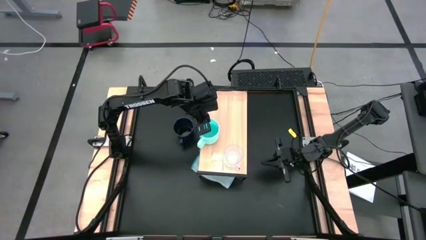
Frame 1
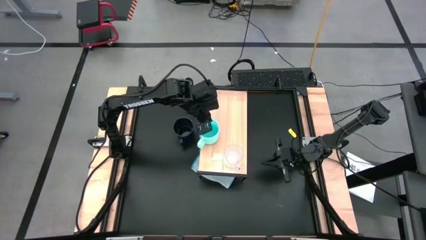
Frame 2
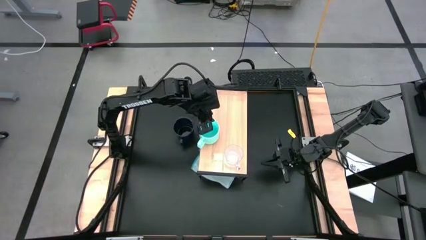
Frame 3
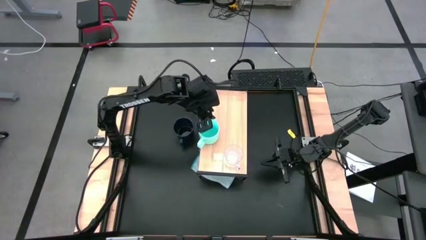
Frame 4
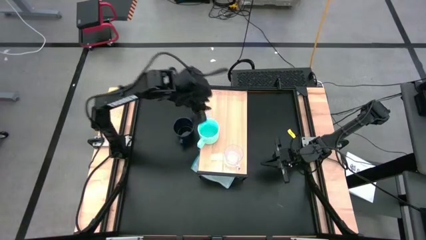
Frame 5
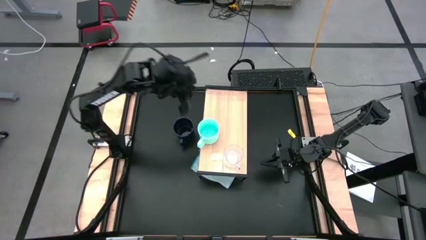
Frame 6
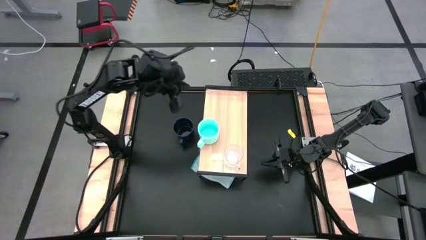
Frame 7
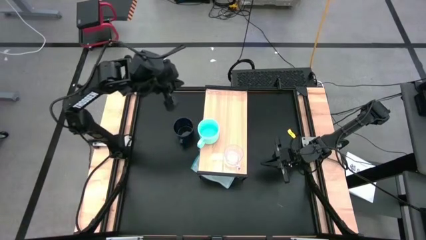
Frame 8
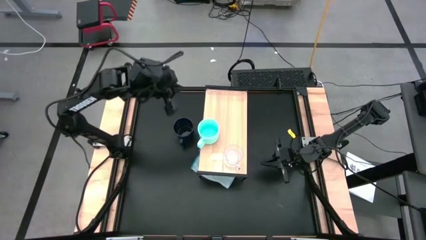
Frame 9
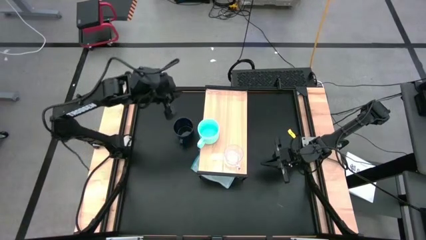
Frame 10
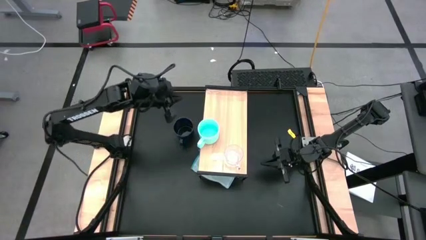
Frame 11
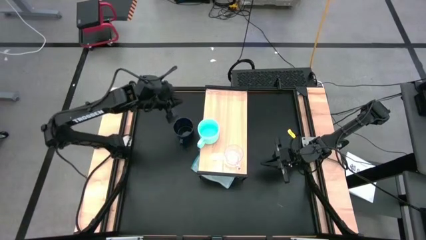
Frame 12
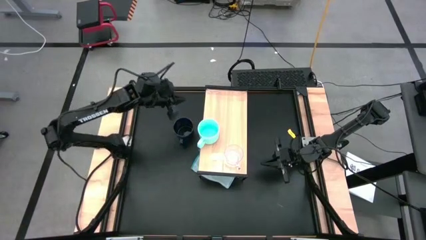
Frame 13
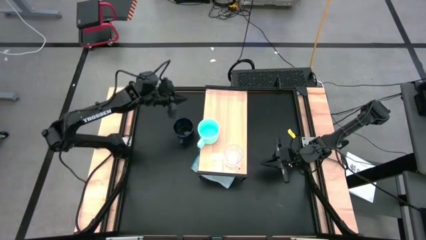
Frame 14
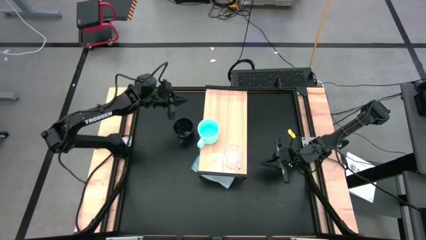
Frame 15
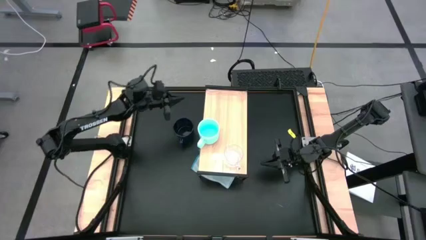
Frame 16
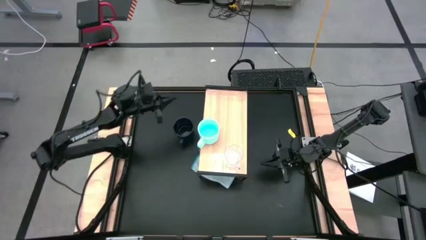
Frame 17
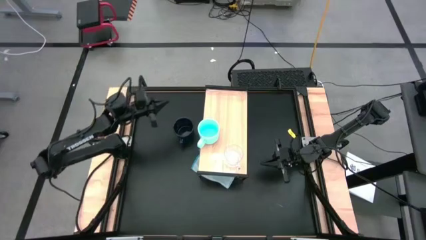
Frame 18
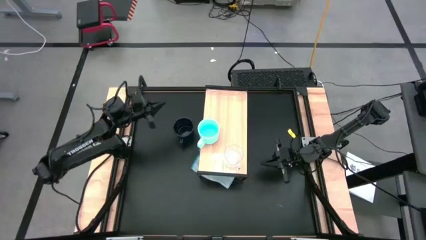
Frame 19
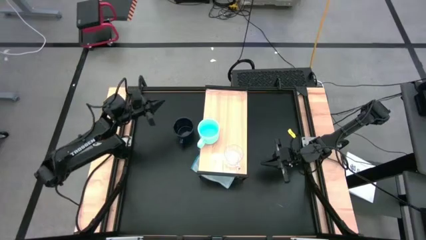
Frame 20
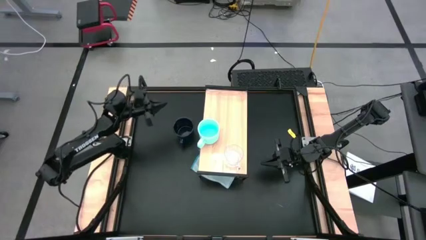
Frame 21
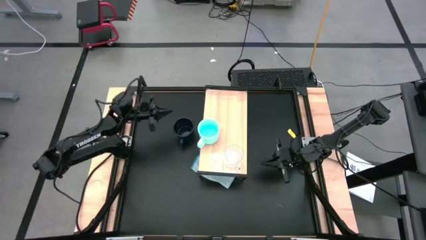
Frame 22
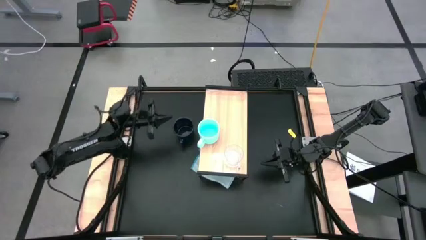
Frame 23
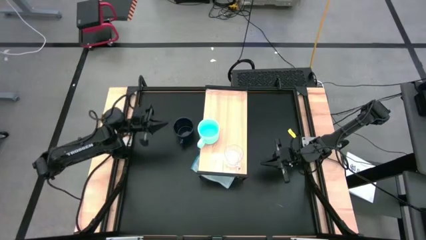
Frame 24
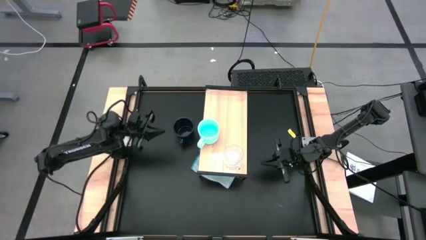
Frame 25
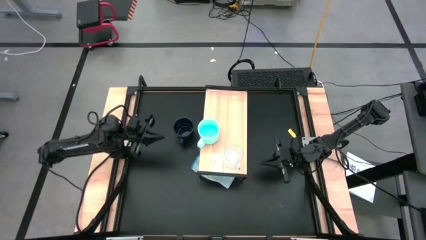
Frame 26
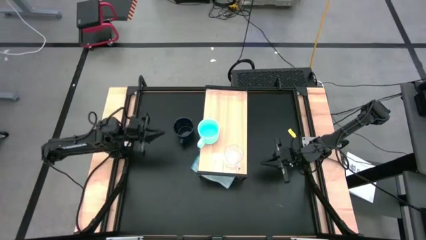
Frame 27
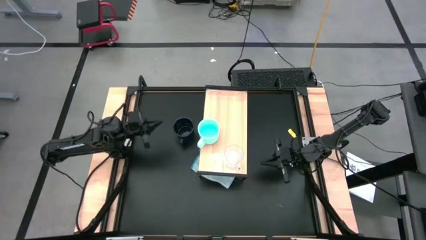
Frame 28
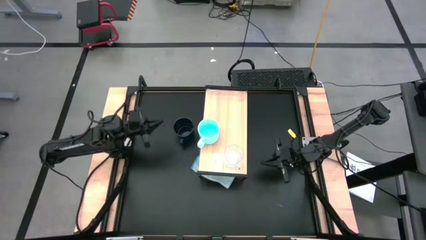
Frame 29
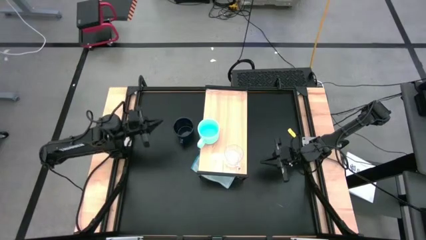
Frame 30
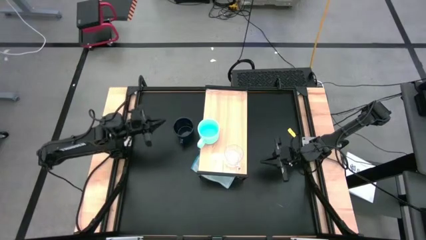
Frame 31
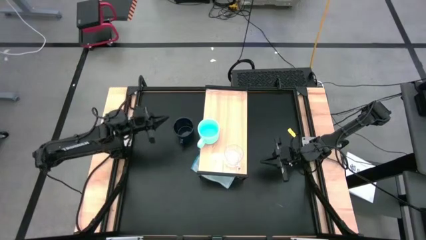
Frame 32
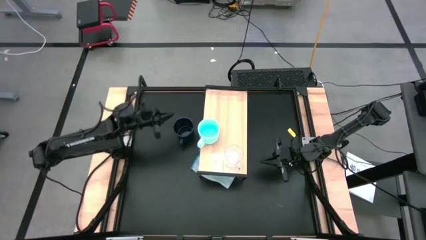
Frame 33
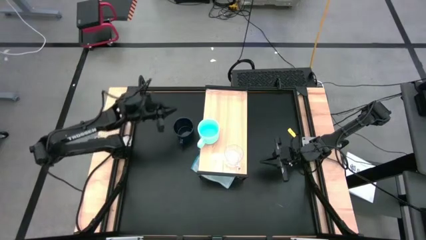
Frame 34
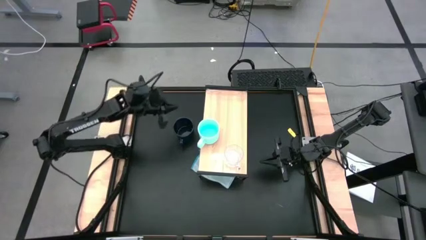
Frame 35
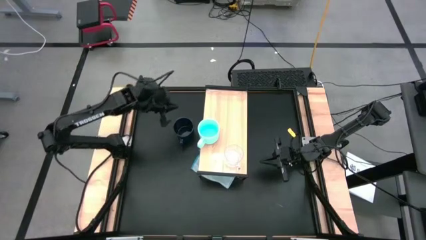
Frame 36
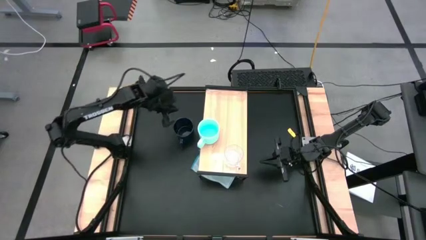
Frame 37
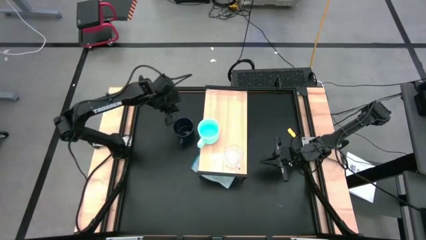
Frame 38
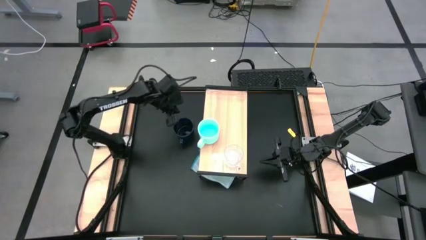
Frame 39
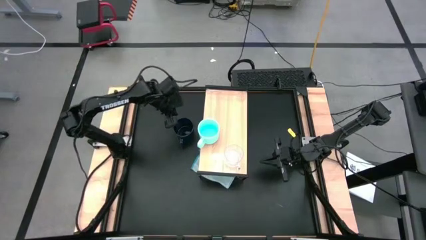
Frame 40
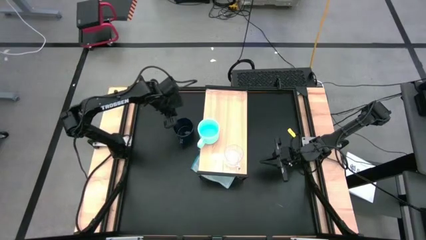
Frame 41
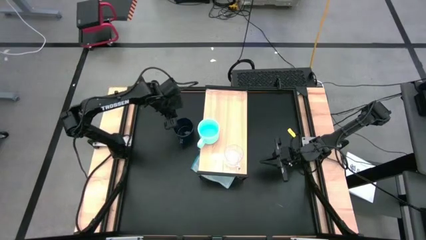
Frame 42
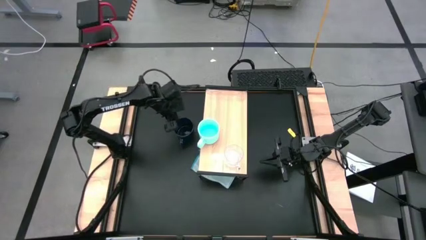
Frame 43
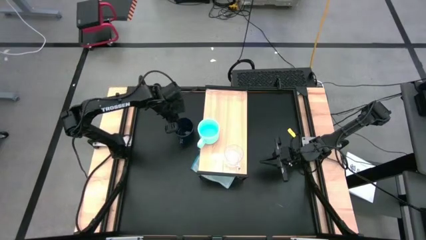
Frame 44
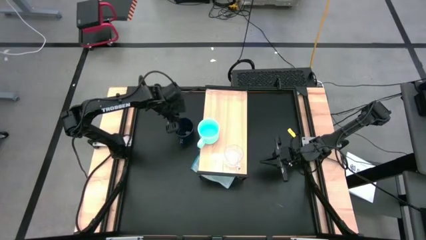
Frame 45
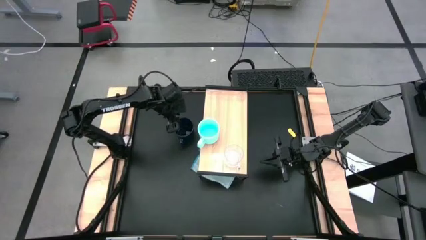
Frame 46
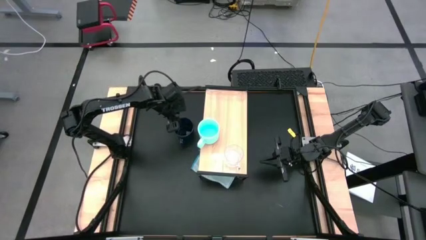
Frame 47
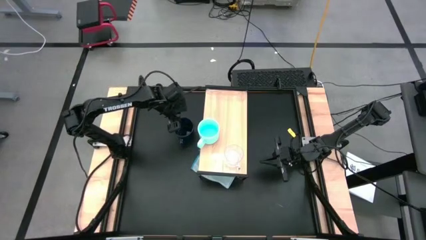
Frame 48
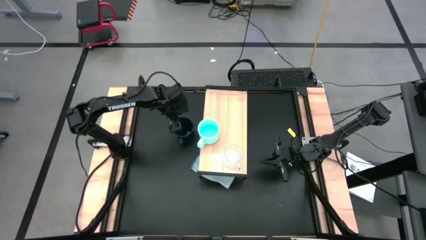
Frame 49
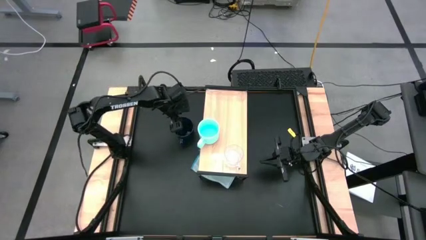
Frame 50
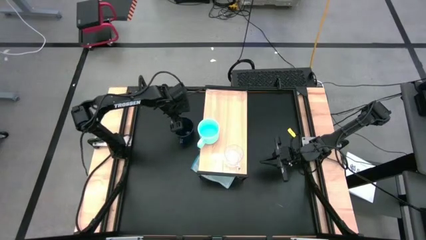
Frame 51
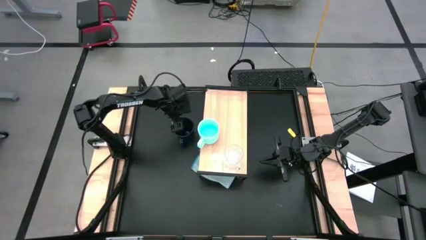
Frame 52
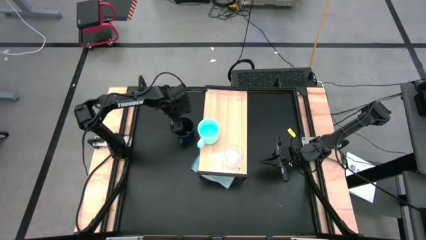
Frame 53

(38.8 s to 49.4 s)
Task: Stack small to large cups/mugs on shelf
Put the dark blue mug on the shelf
